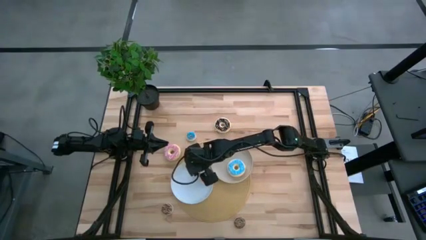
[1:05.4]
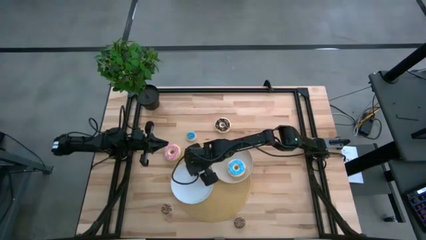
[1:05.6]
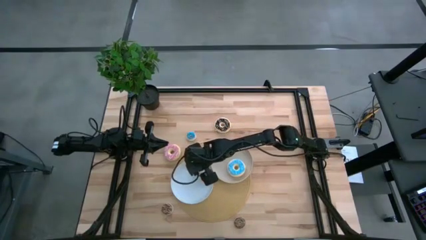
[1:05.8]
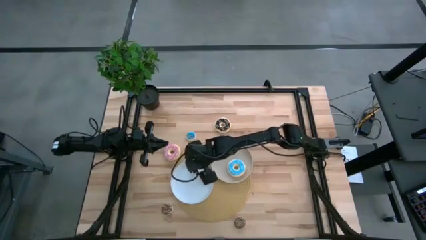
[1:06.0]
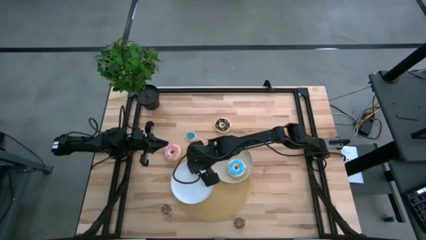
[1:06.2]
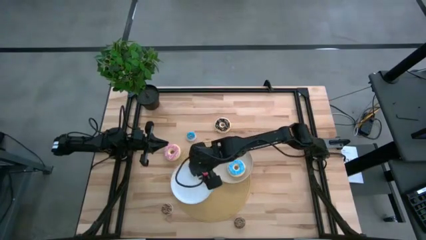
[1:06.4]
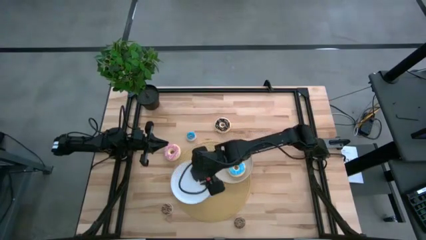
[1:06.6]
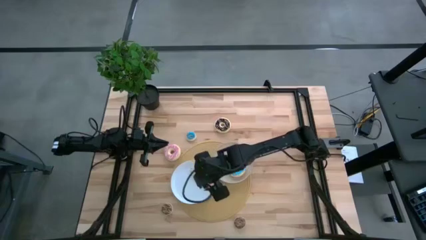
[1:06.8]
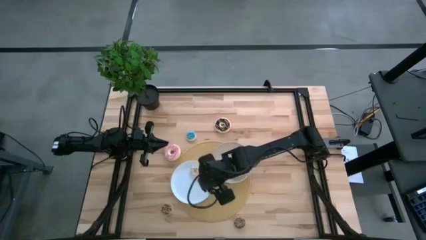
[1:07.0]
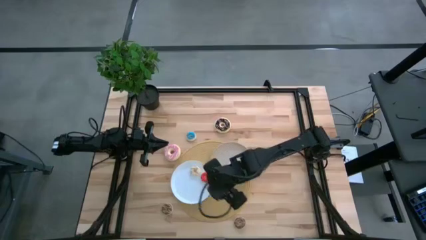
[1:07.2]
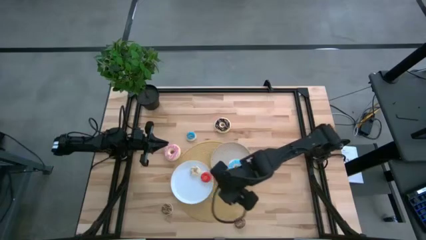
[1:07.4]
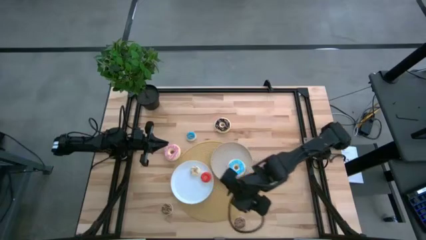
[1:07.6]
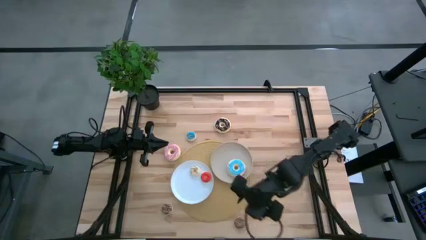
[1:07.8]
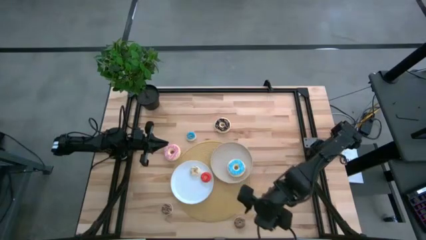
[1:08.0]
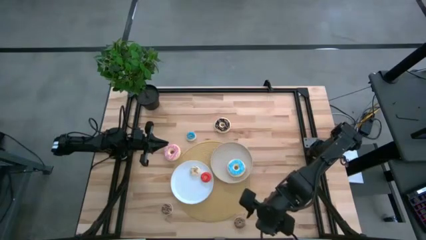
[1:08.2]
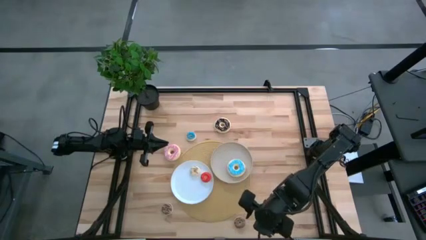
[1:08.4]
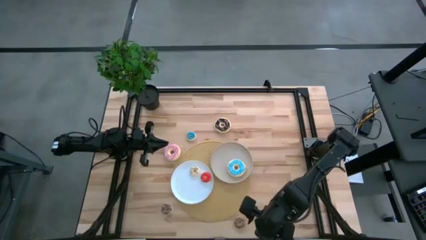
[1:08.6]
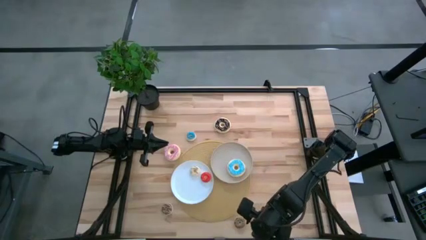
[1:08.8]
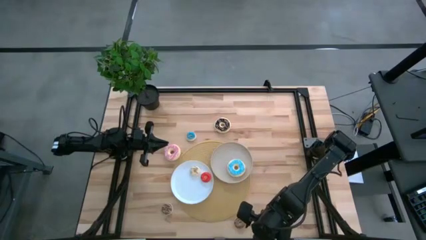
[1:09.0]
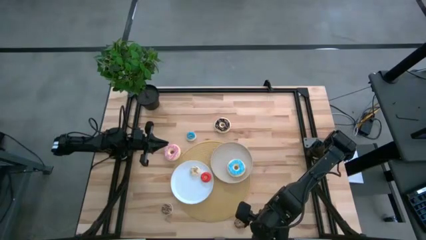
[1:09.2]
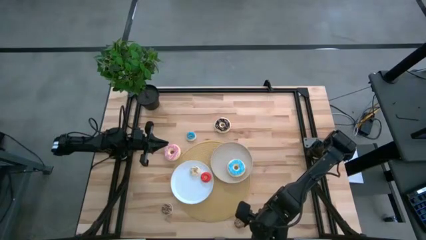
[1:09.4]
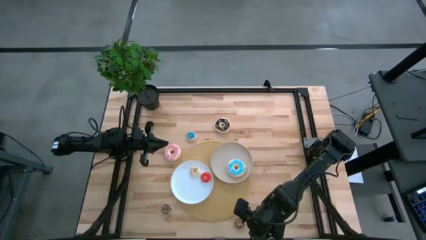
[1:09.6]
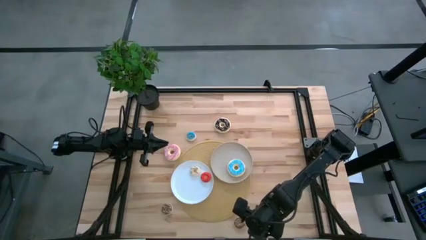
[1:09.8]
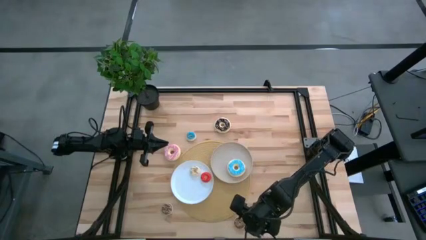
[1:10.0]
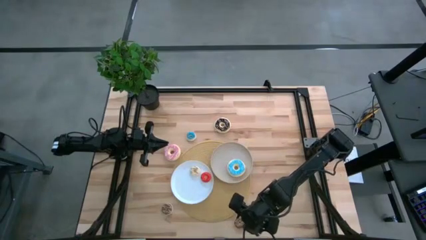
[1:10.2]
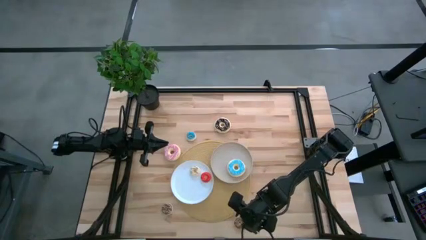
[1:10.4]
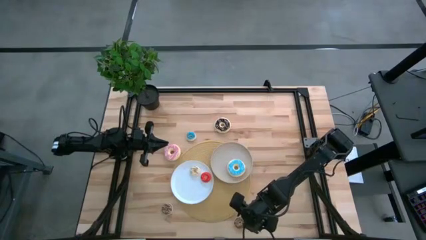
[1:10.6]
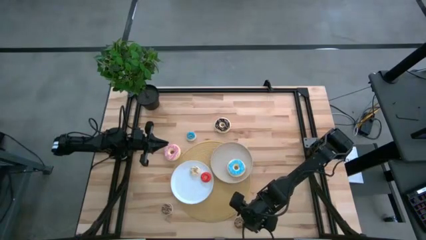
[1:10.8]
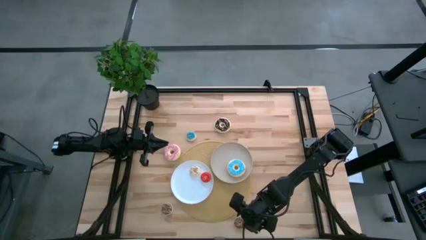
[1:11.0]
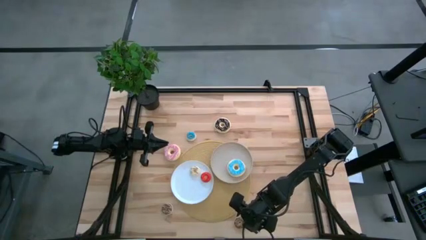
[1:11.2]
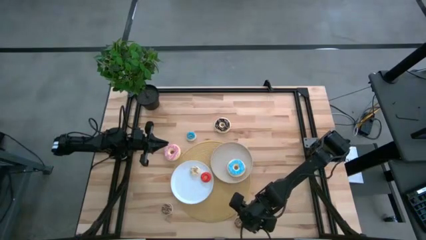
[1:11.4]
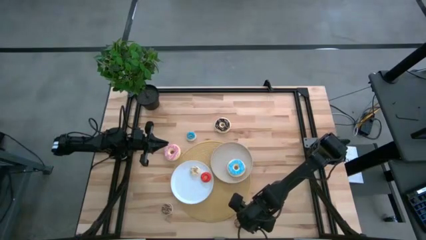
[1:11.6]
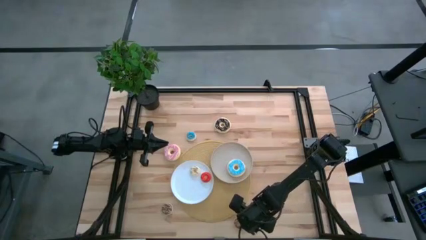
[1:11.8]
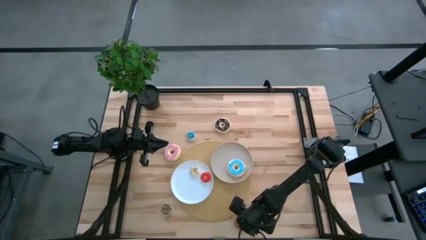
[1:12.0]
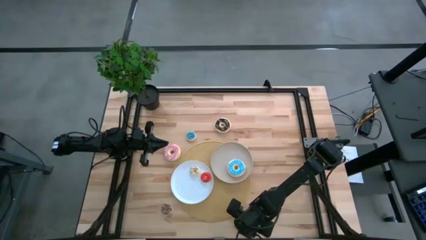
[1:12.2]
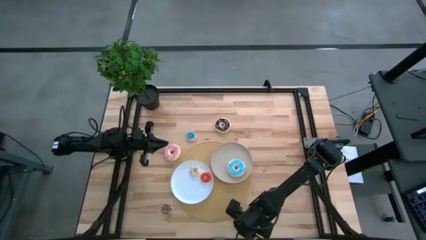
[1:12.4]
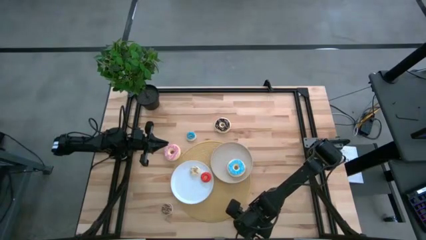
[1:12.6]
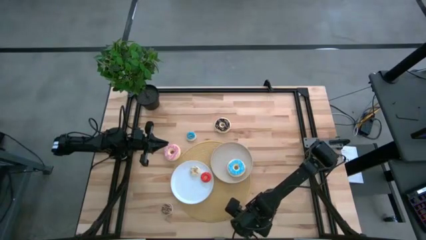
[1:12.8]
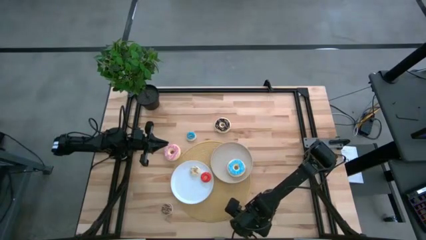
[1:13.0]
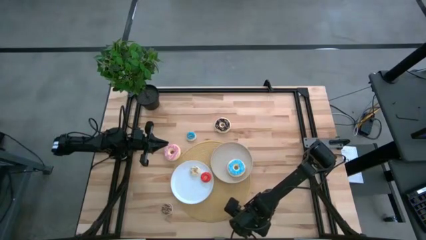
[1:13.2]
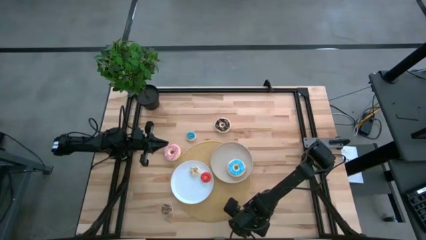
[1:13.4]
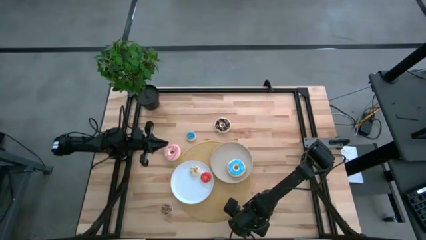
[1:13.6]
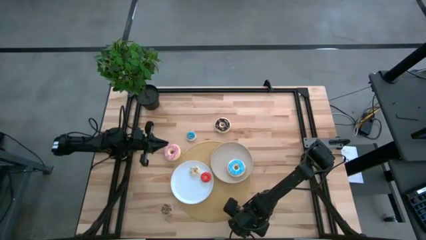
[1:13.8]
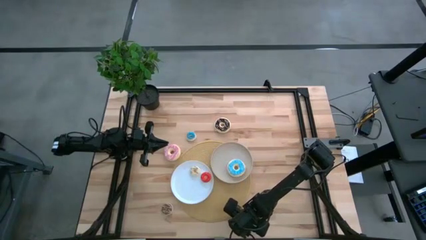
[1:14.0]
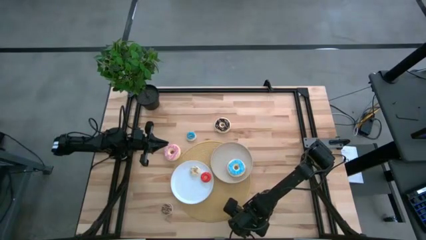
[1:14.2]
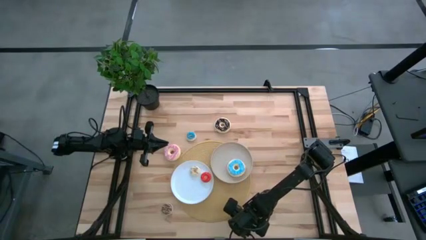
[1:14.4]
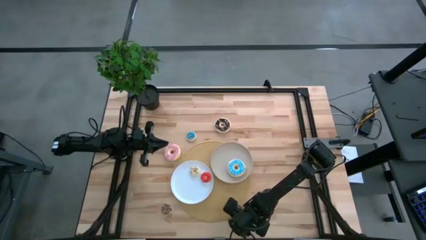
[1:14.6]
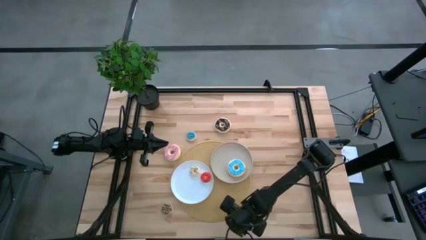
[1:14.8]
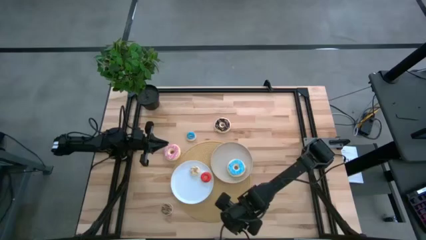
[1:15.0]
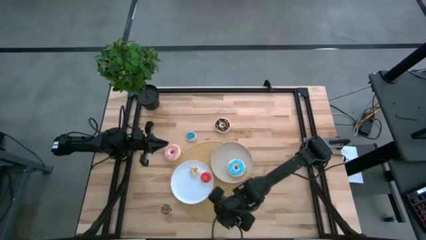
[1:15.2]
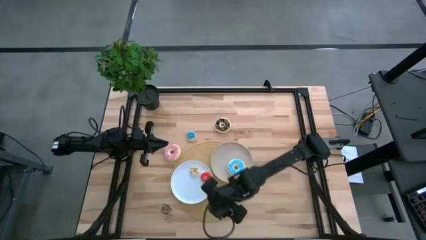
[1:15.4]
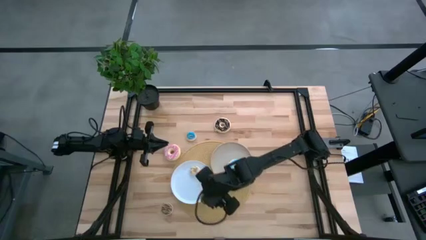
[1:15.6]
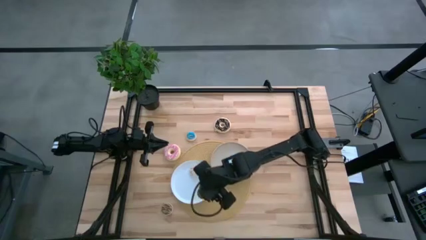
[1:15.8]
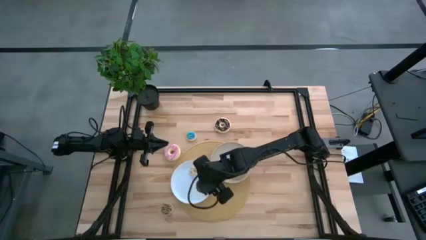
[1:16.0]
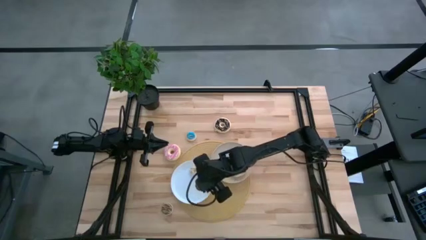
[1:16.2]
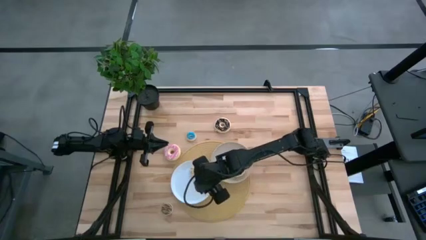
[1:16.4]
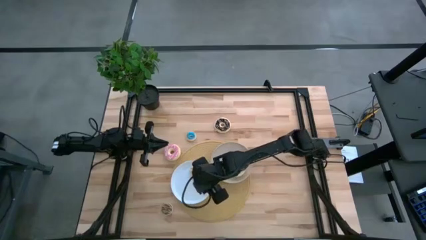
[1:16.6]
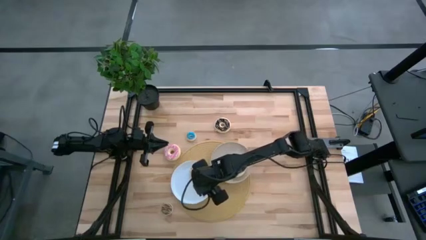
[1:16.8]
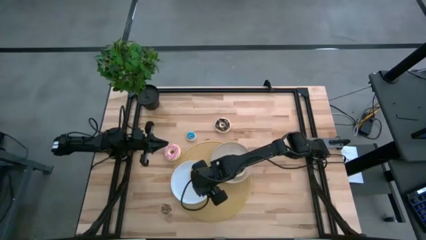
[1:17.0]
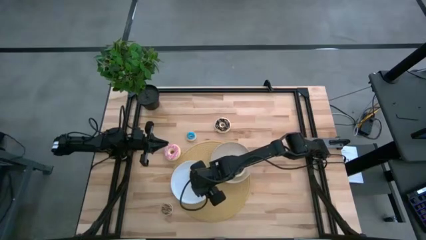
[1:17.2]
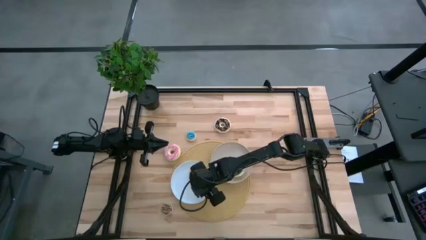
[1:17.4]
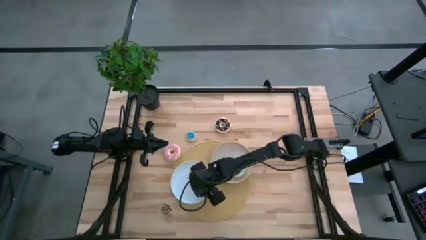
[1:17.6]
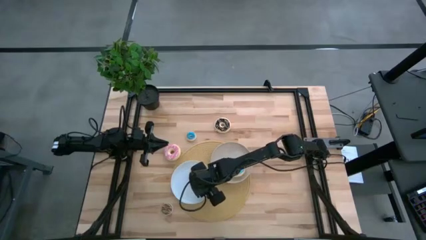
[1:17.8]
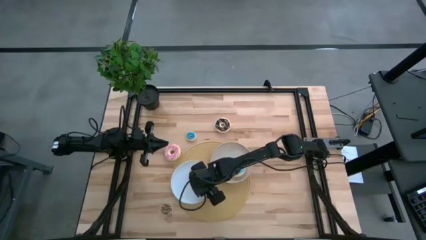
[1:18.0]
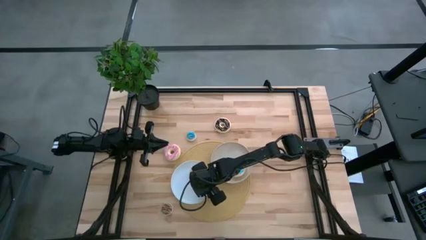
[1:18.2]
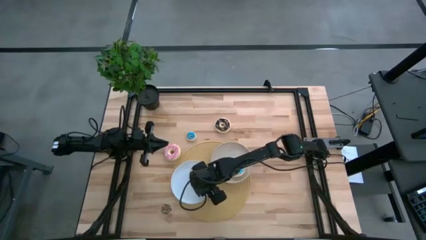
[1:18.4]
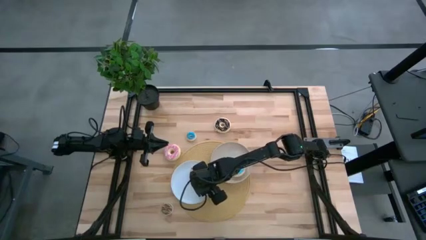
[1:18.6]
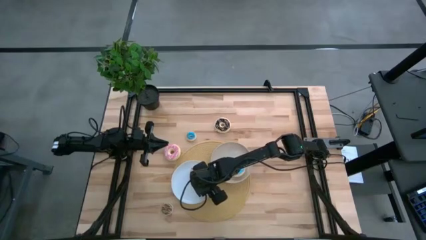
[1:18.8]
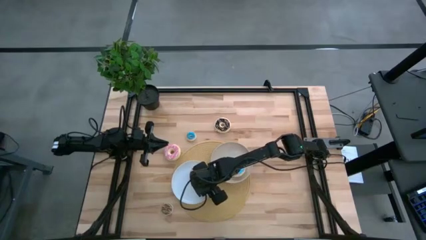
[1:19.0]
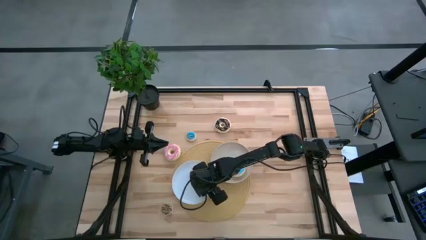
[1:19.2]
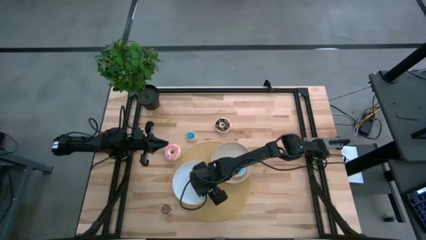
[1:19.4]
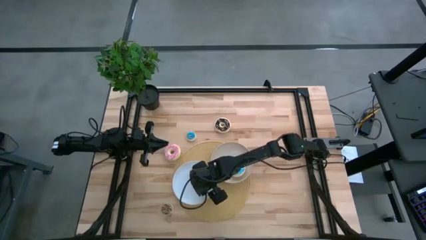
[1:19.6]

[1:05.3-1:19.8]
Task: Pick & Place donuts
Put the bottom brown donut on the white plate

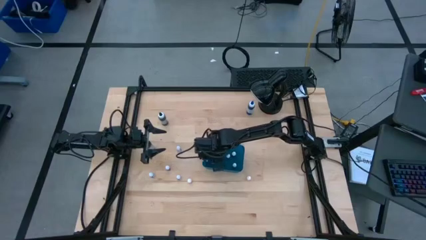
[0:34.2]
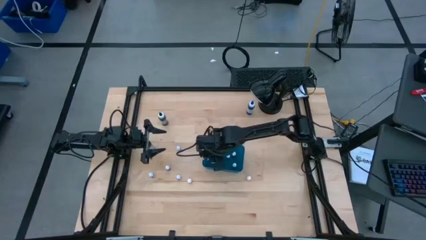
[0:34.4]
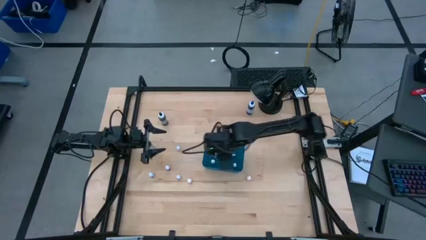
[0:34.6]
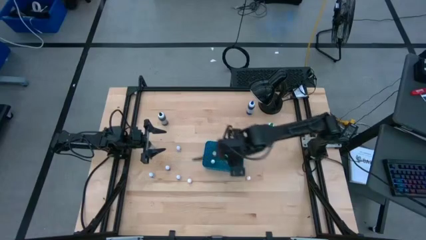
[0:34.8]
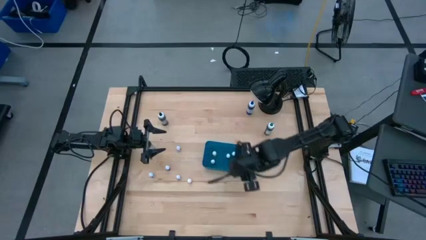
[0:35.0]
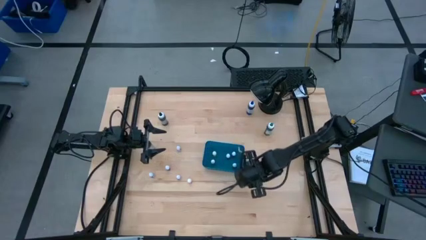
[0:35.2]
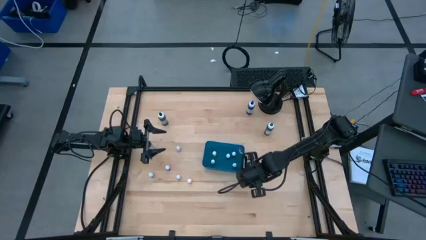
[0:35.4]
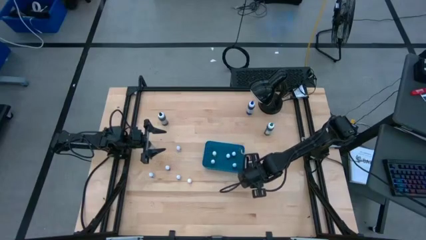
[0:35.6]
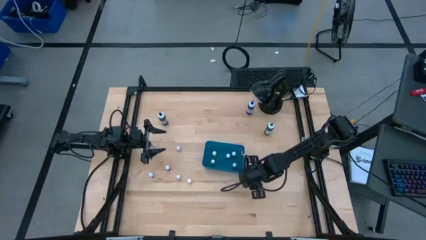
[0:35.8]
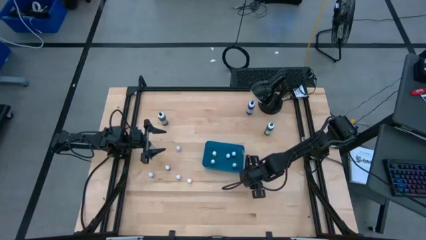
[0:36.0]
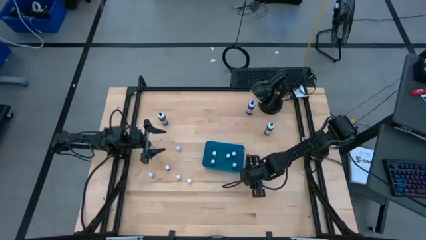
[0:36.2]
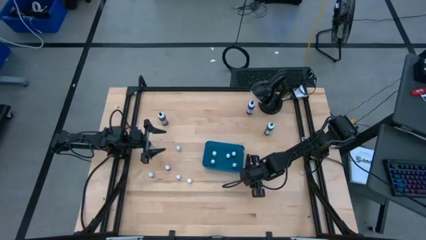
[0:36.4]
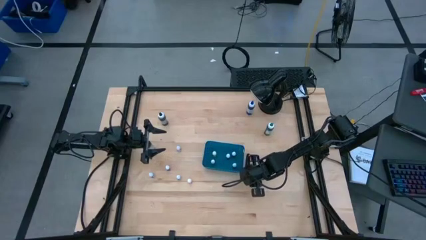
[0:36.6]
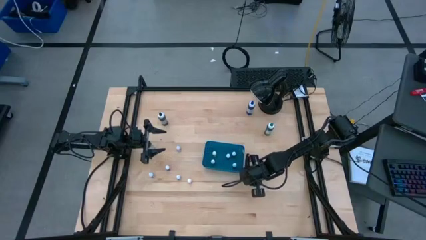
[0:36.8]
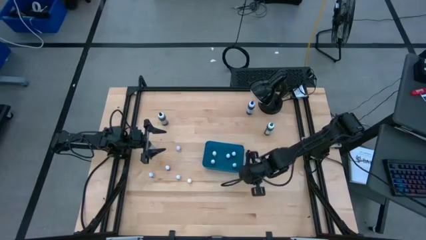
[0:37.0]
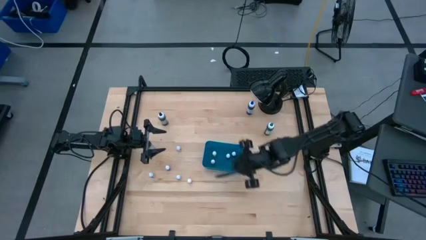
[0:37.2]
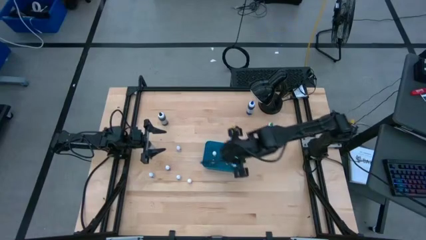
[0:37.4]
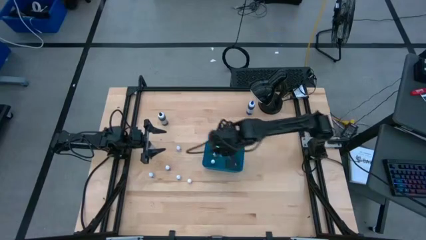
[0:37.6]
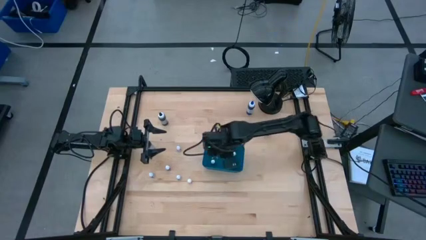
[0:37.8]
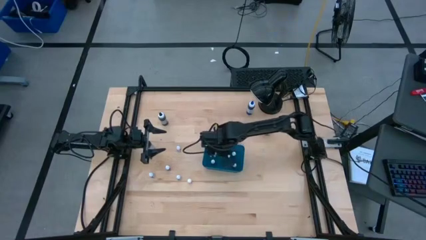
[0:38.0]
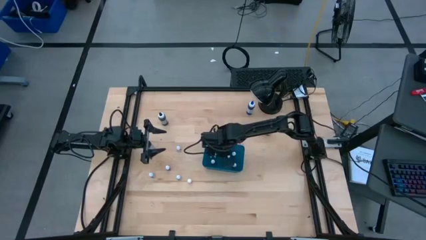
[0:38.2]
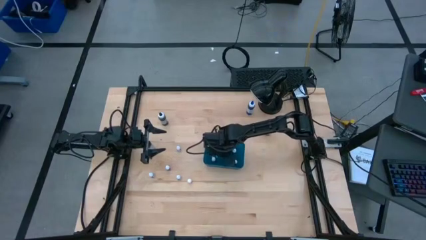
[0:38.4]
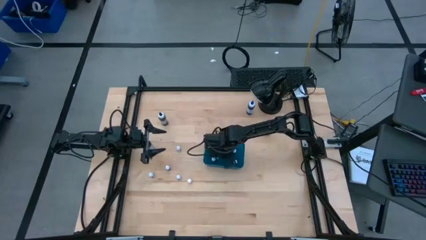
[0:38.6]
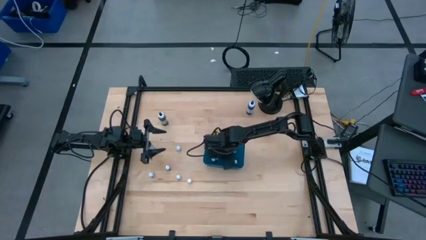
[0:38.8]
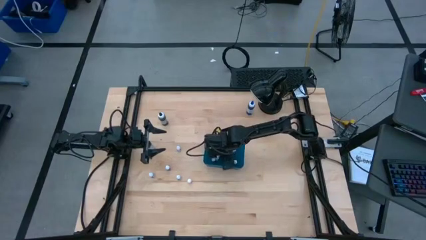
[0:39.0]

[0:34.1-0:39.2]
Task: Pick & Place food coloring
Put the small orange food coloring bottle into the blue bin
